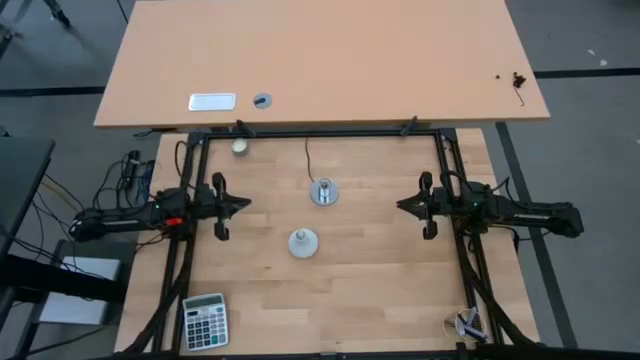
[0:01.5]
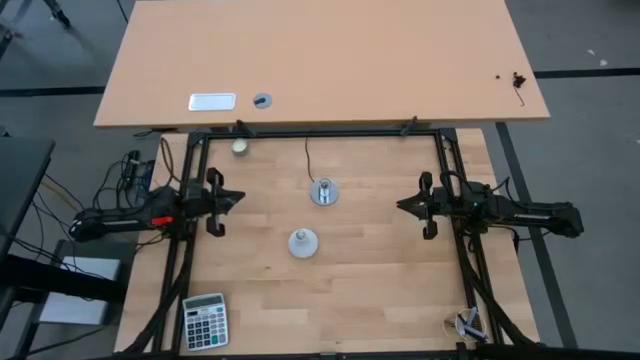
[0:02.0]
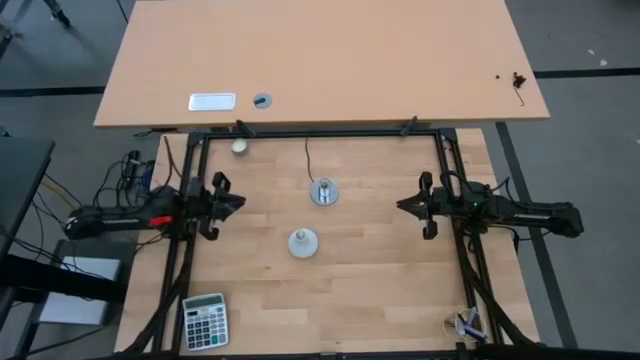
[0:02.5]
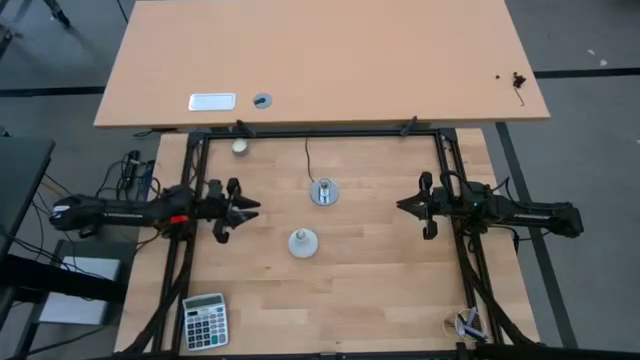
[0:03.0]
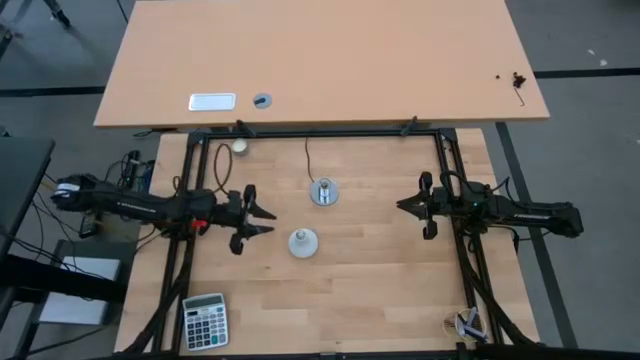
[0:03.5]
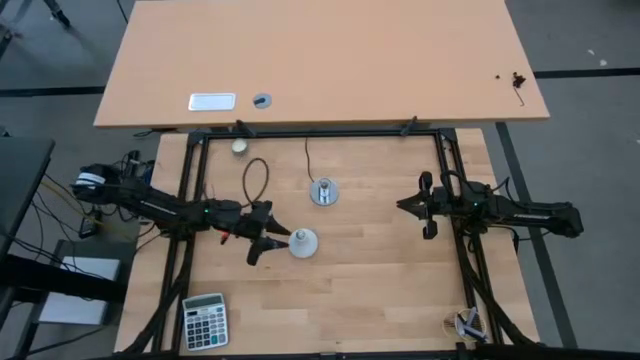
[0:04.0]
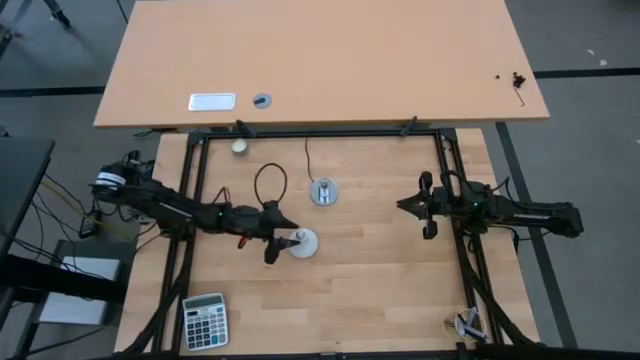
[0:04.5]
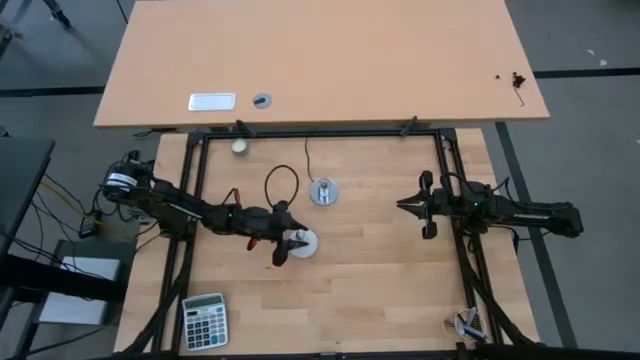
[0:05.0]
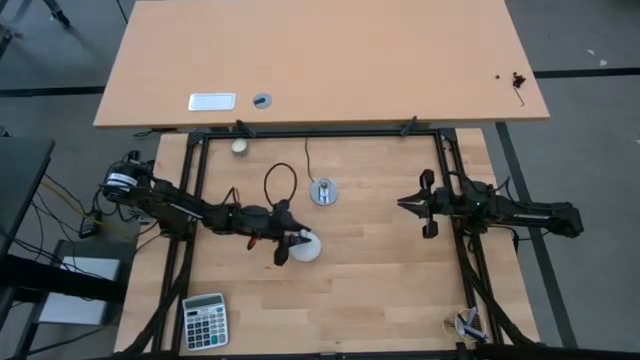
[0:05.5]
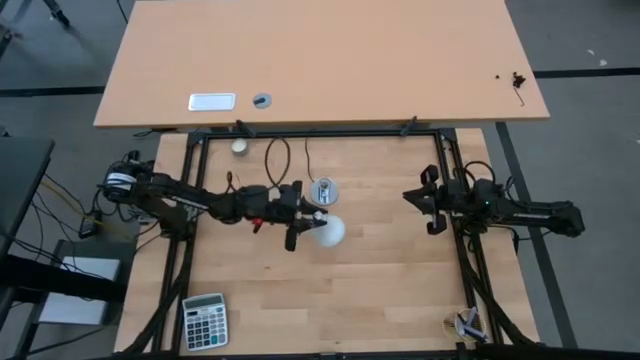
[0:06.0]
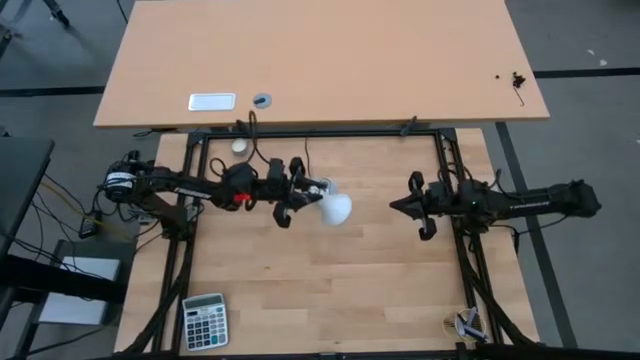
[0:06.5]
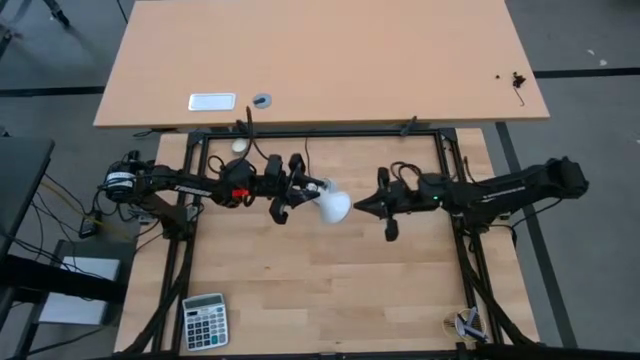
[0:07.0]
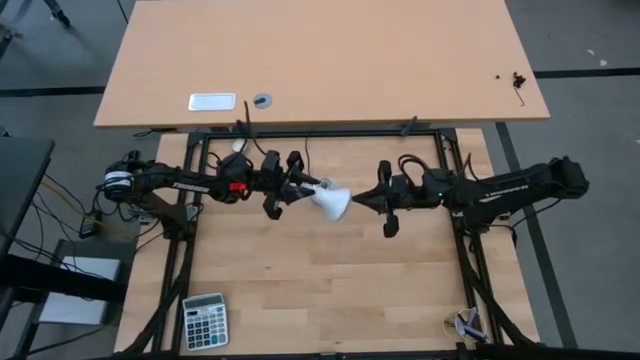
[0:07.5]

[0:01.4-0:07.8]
Task: Screw lightbulb
Insert the lightbulb into the lamp

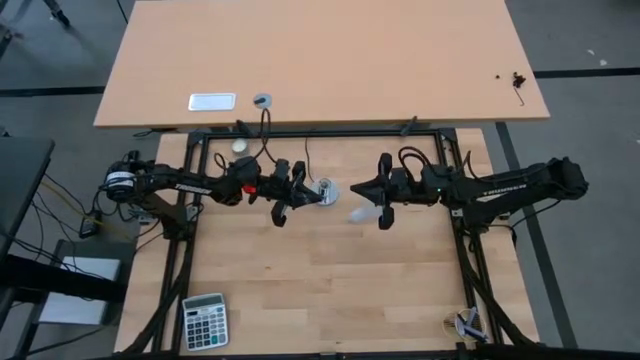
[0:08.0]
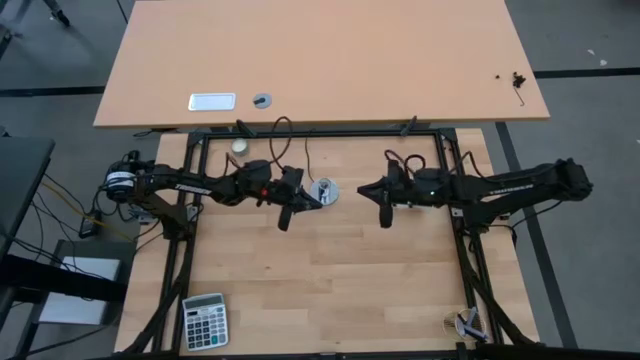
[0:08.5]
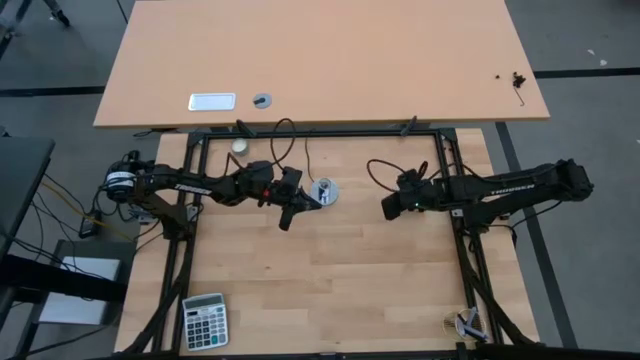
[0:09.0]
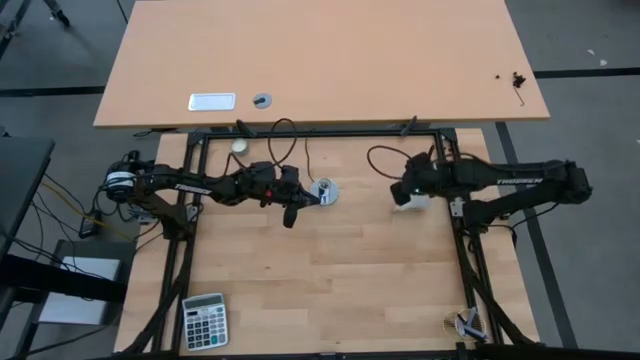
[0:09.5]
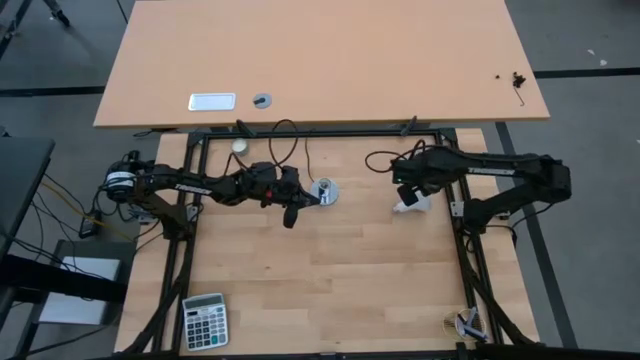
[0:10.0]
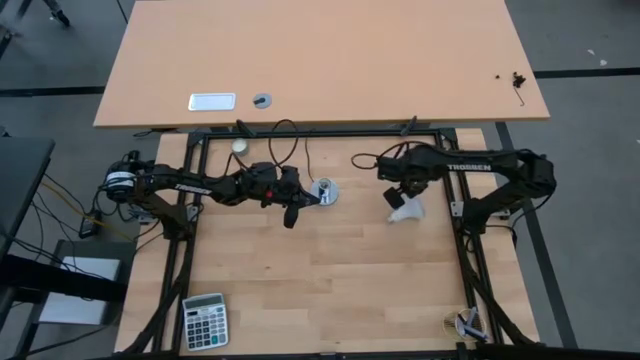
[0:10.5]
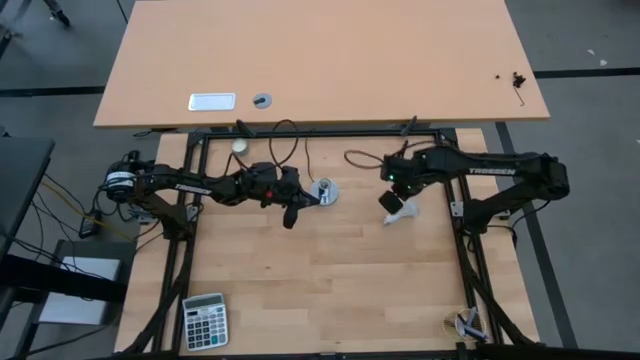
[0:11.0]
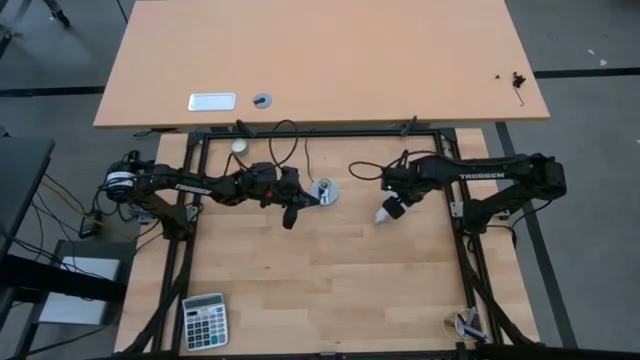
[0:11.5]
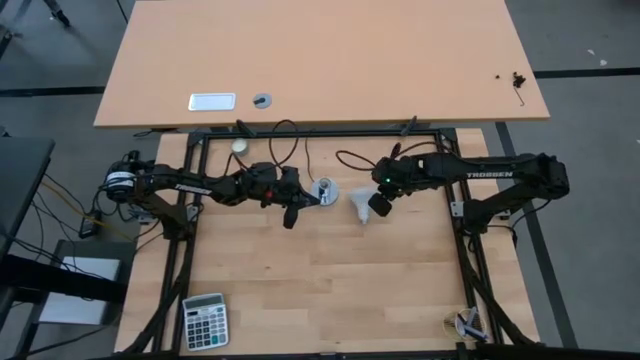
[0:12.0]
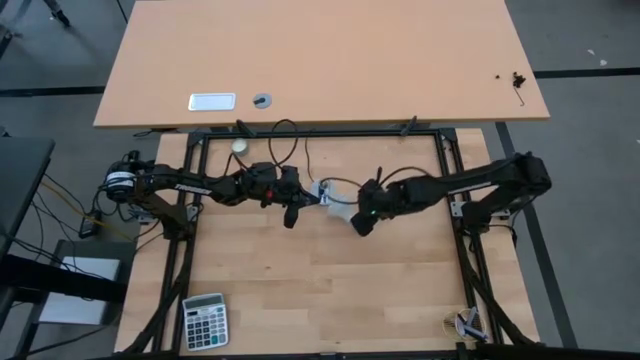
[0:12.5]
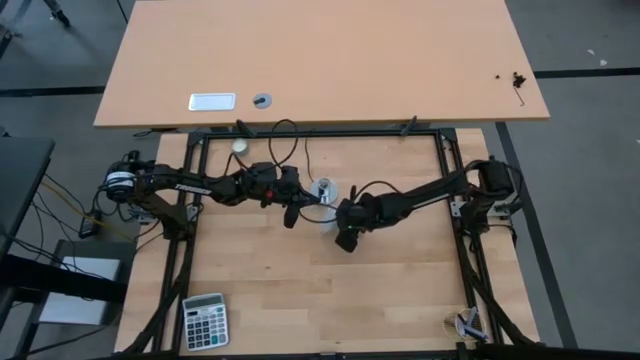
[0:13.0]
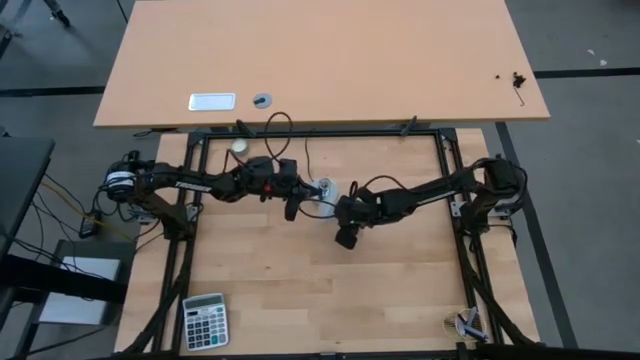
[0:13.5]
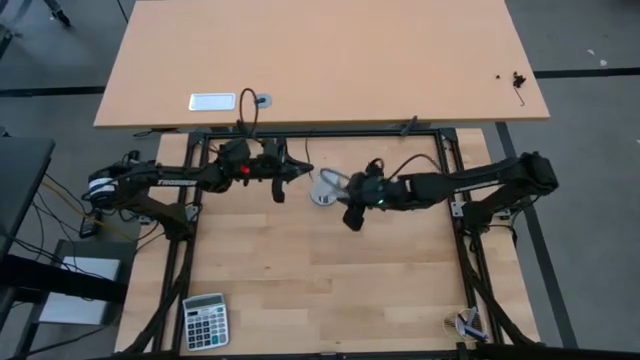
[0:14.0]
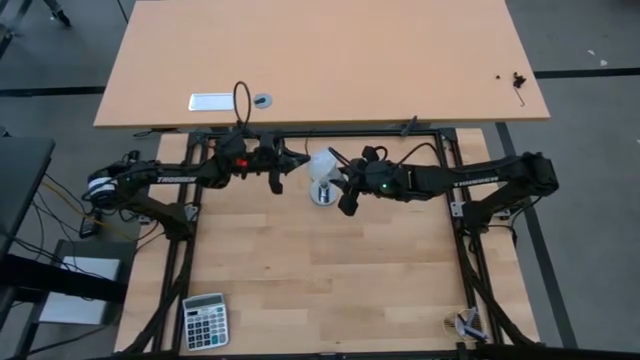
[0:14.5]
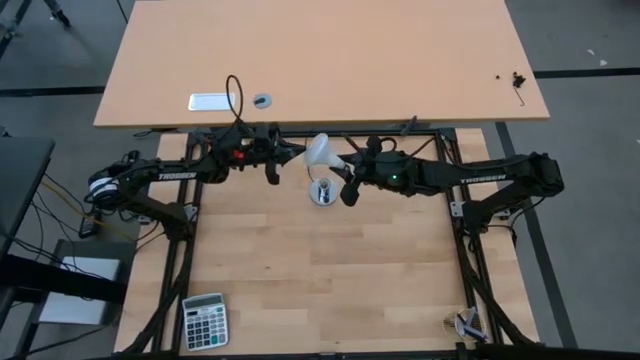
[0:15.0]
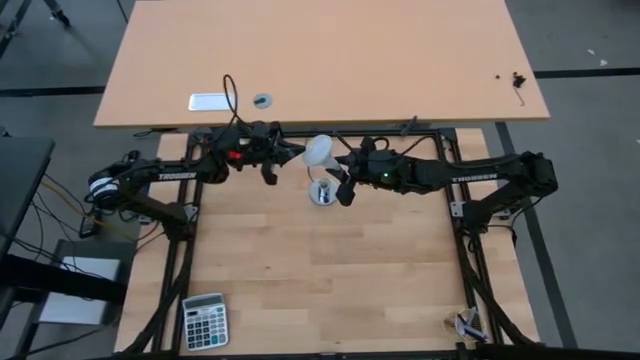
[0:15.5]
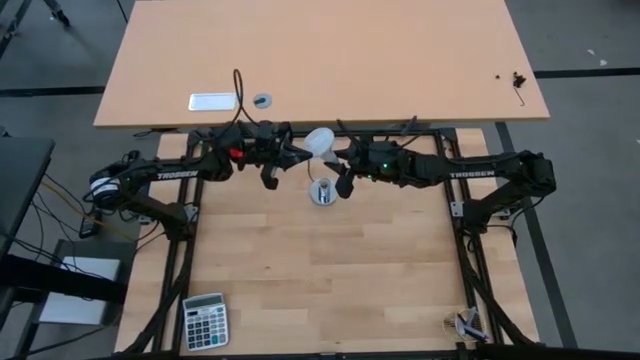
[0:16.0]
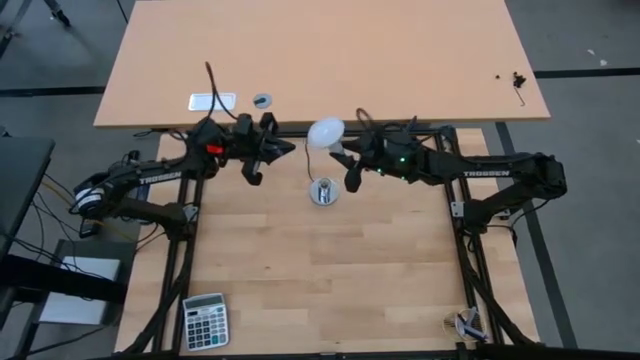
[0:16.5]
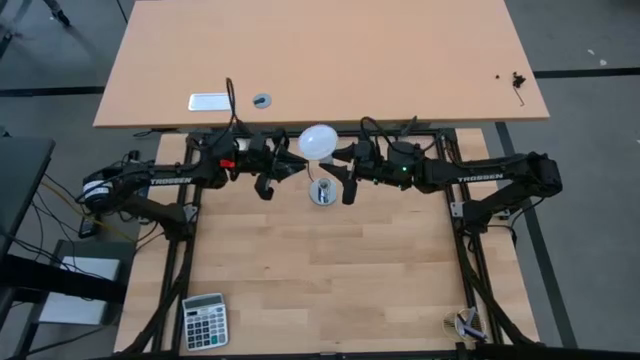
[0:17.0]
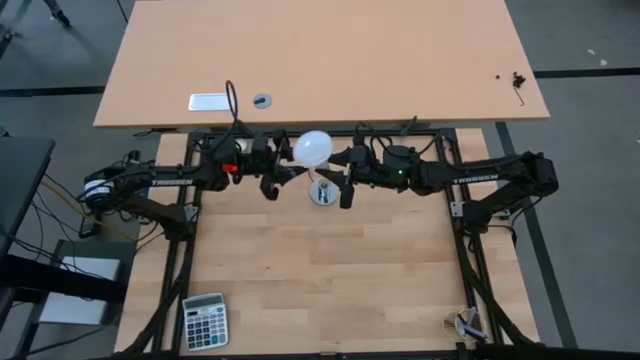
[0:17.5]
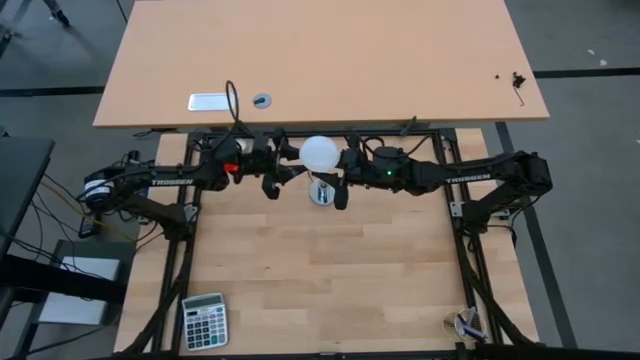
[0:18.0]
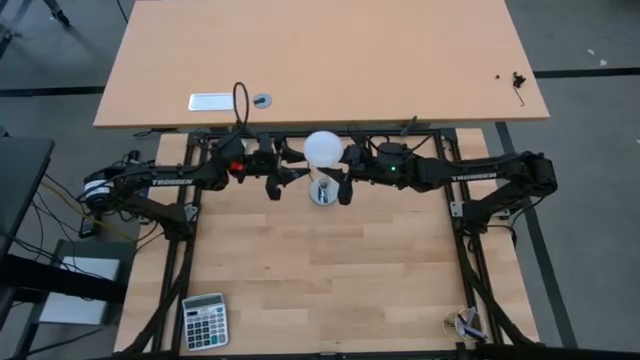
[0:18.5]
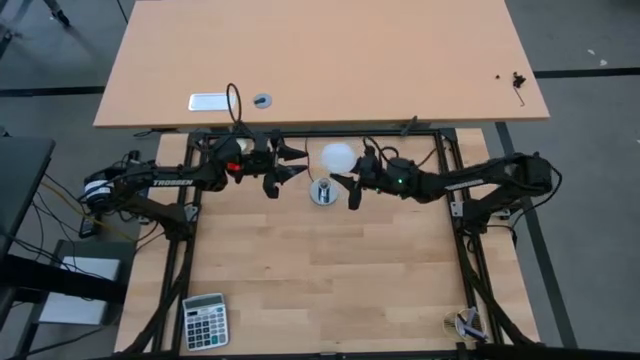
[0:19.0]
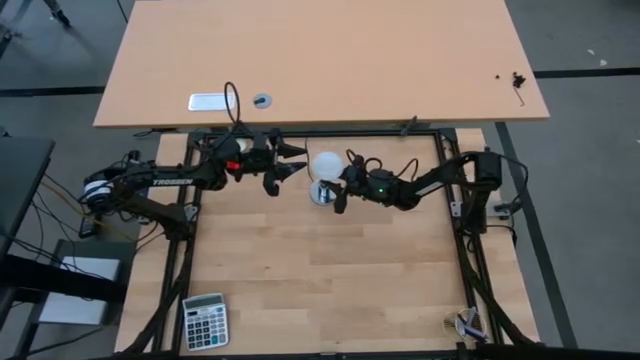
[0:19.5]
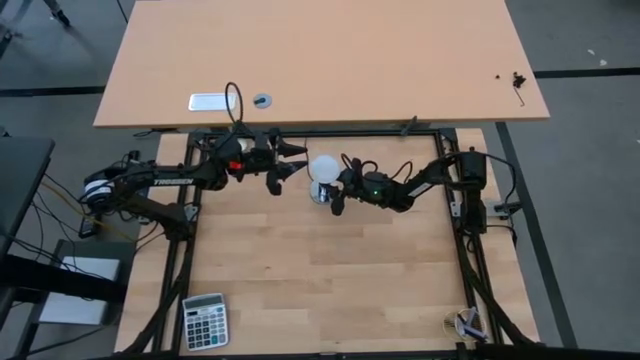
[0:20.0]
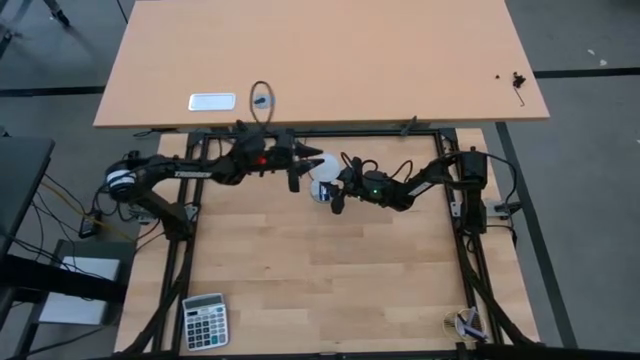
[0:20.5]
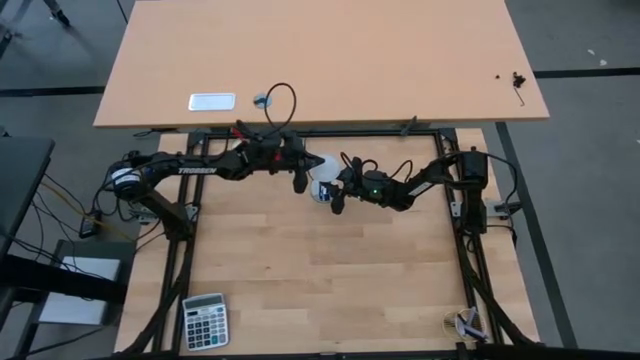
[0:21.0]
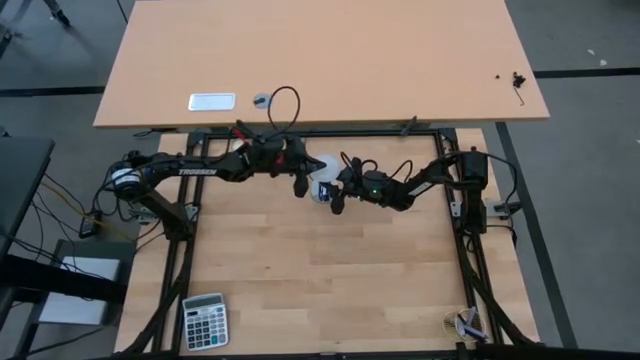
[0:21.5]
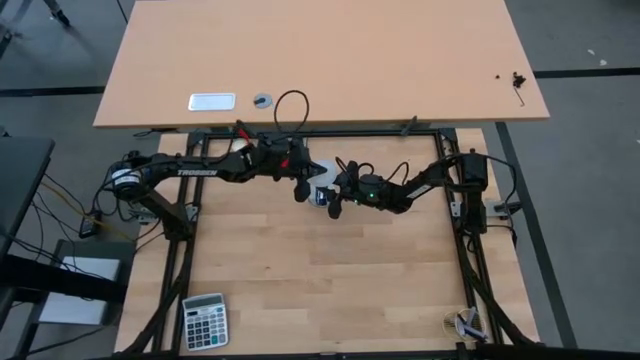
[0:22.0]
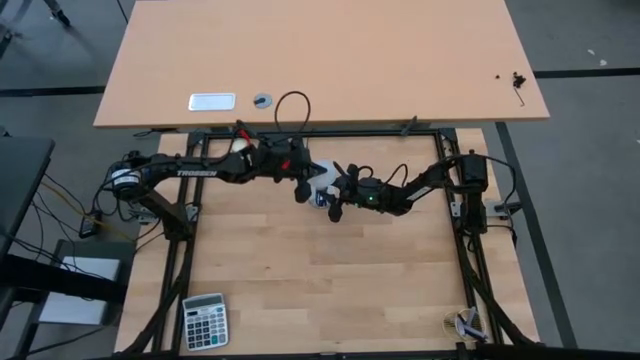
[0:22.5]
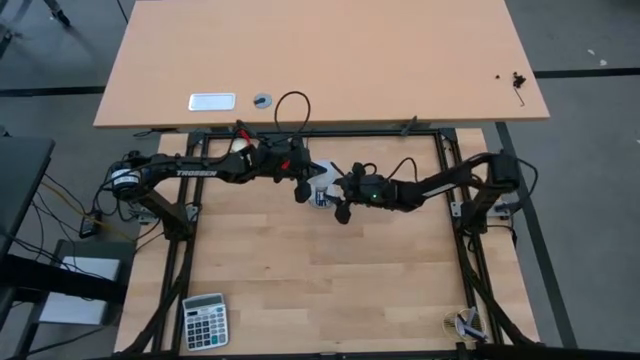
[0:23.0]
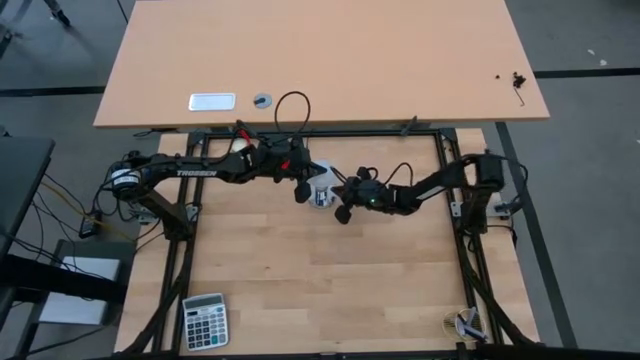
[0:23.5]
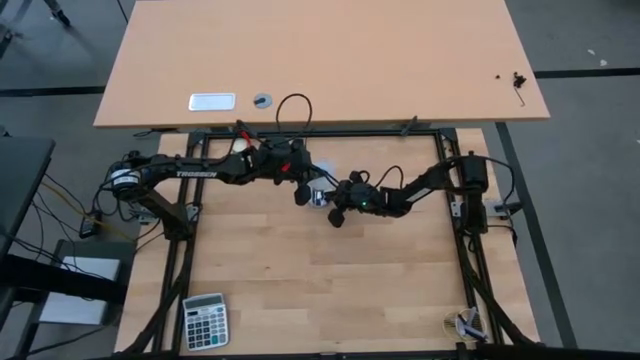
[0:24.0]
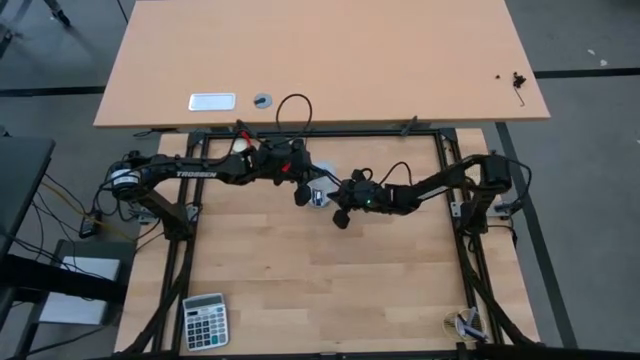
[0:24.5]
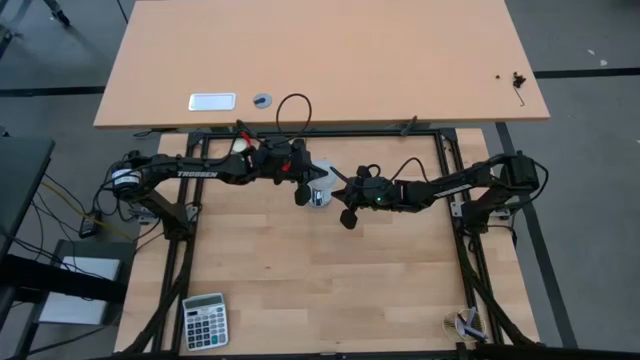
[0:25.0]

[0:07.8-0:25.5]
Insert the lightbulb into the lamp
